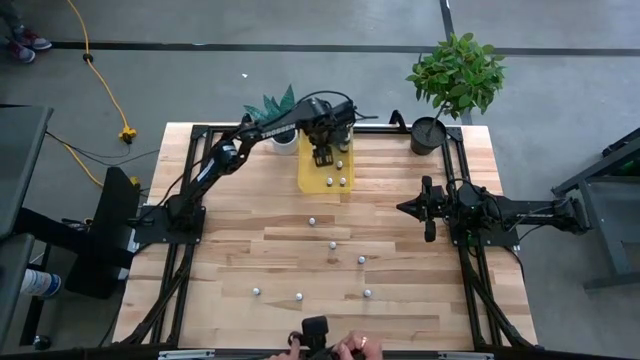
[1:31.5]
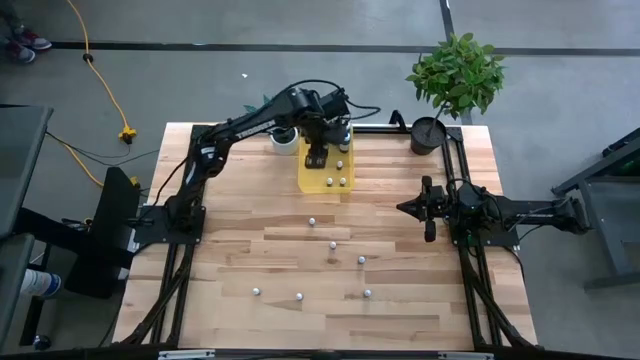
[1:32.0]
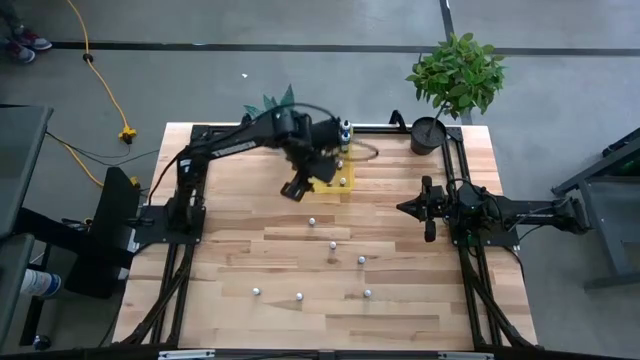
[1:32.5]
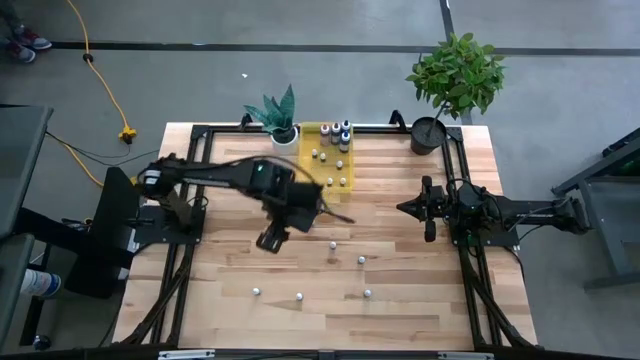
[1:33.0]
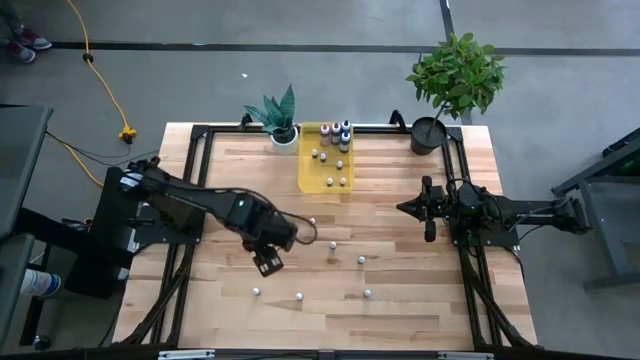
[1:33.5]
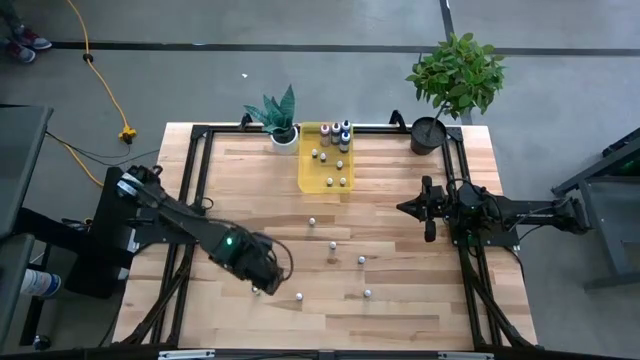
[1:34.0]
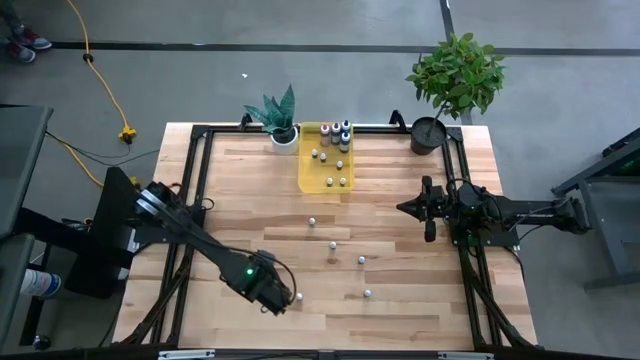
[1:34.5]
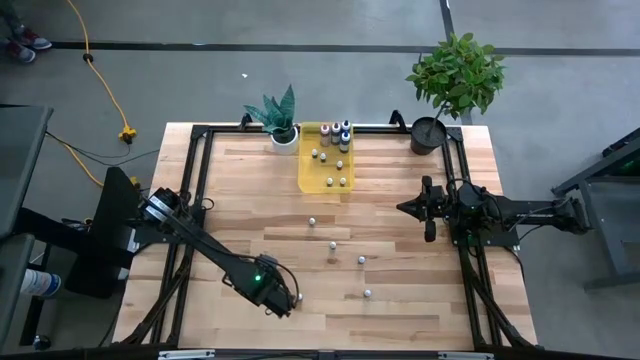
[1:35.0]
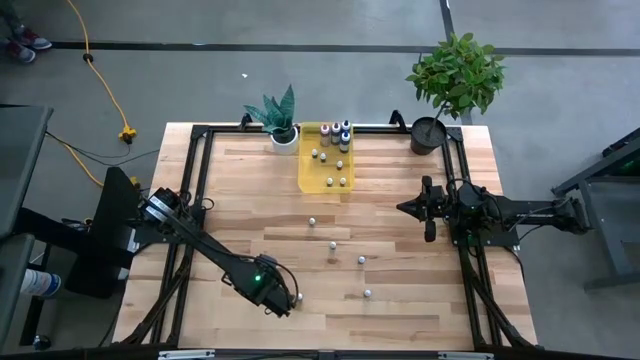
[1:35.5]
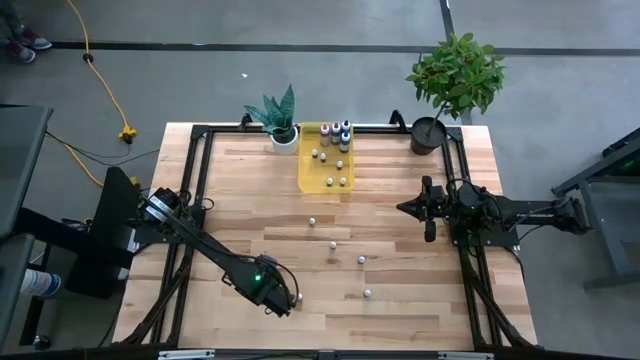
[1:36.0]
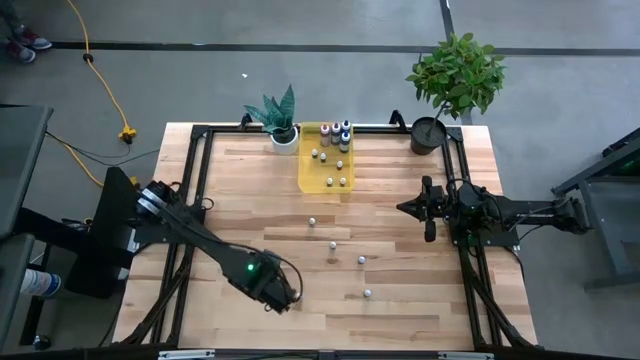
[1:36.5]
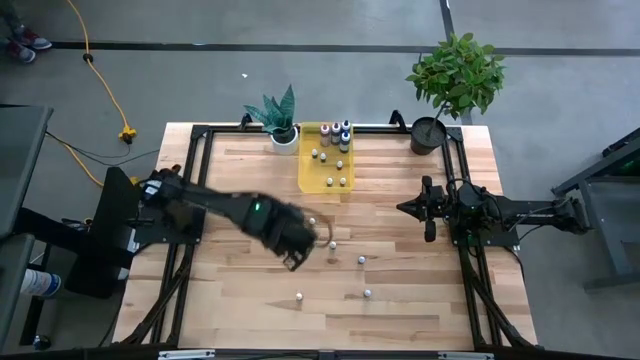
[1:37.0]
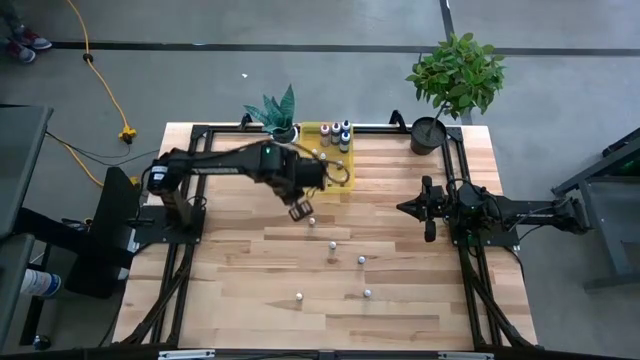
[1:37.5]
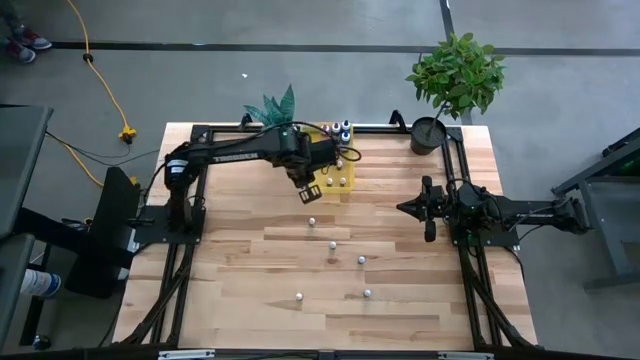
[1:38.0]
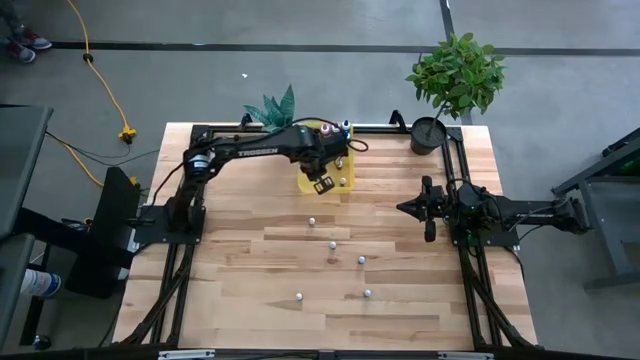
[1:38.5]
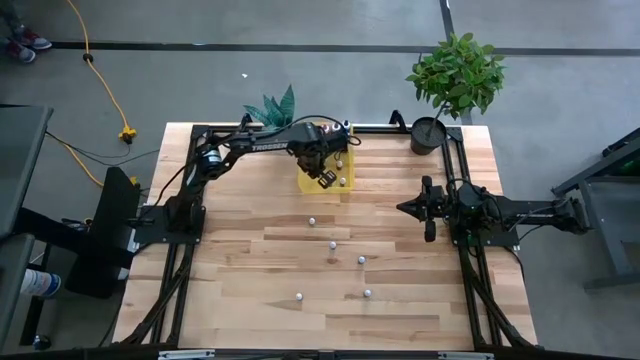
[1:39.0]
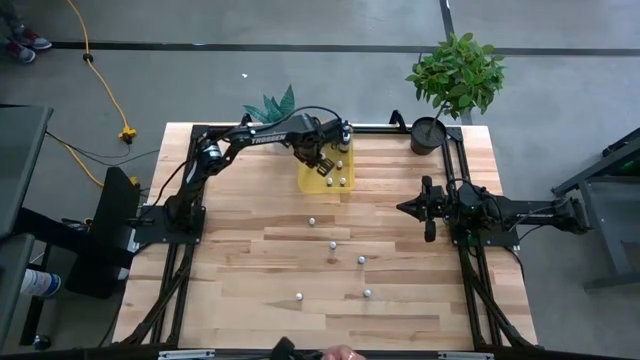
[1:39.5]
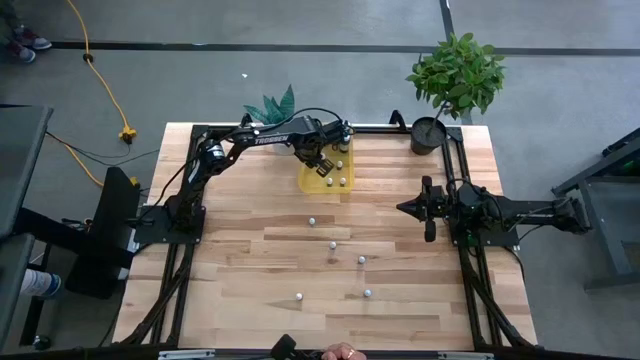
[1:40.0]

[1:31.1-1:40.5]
Task: Pick & Place food coloring
Put the small purple food coloring bottle into the yellow bin

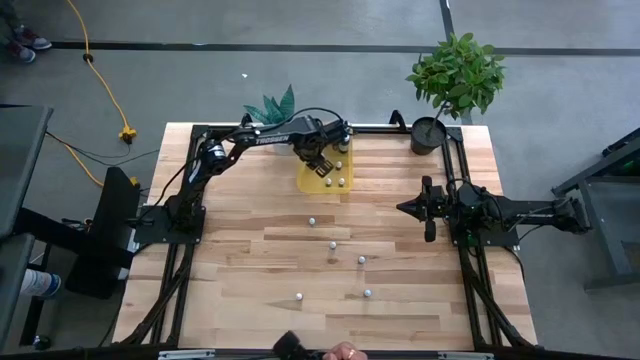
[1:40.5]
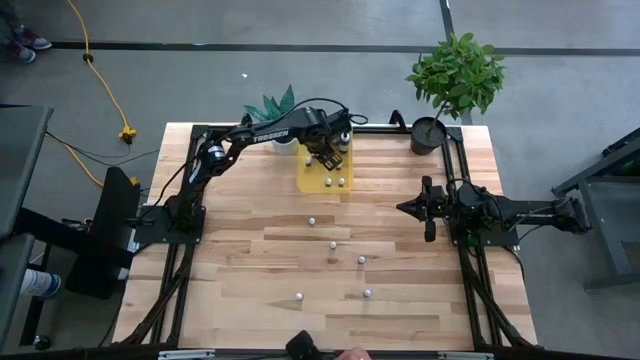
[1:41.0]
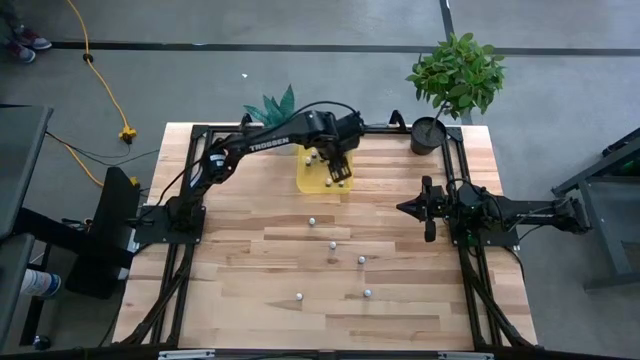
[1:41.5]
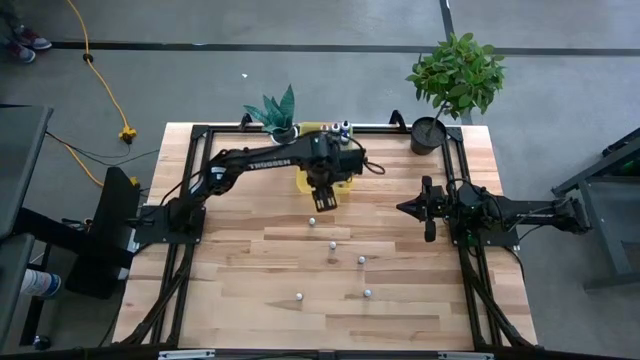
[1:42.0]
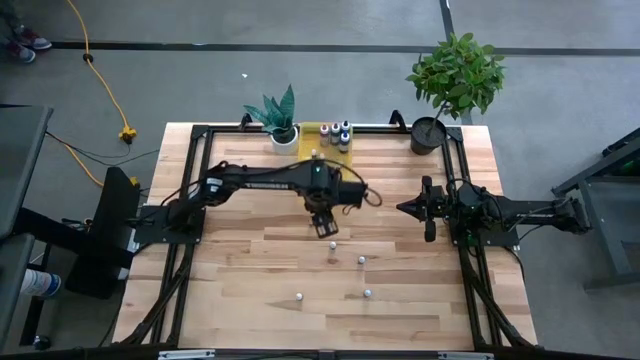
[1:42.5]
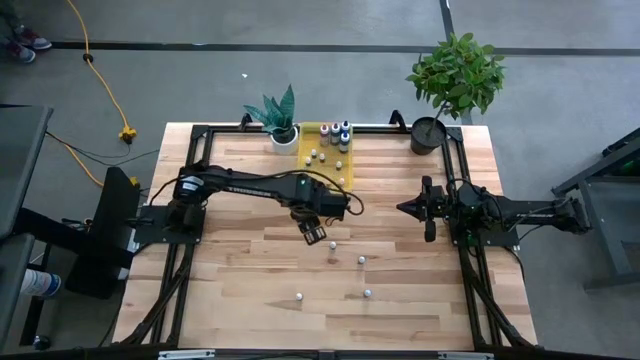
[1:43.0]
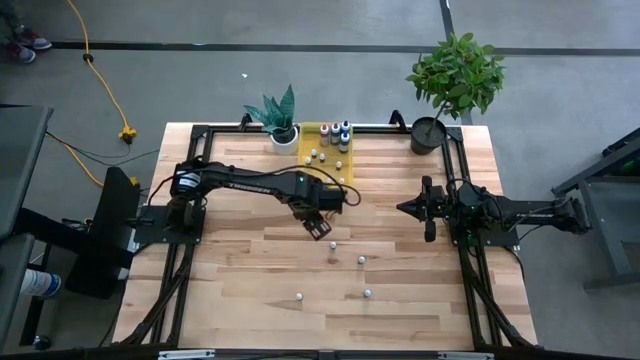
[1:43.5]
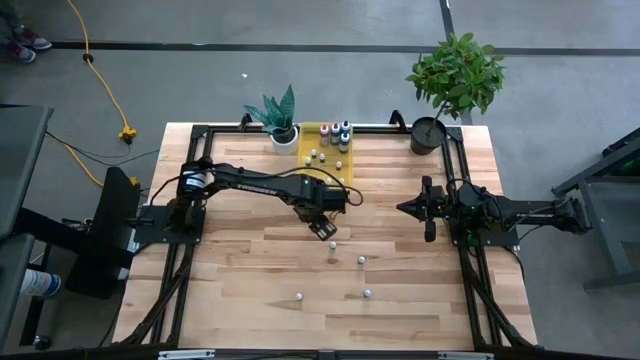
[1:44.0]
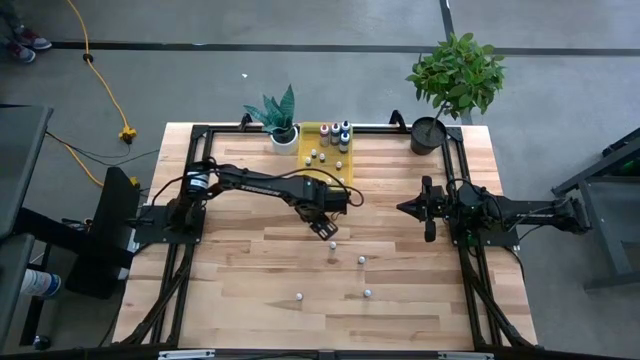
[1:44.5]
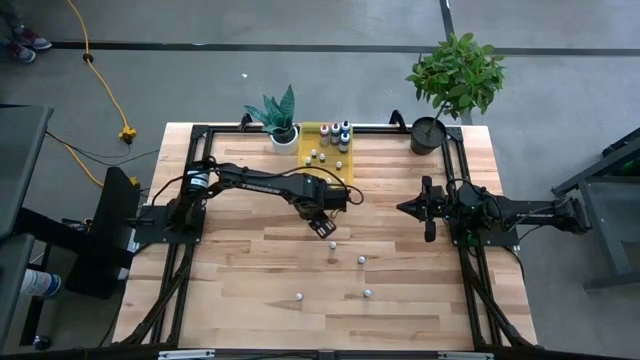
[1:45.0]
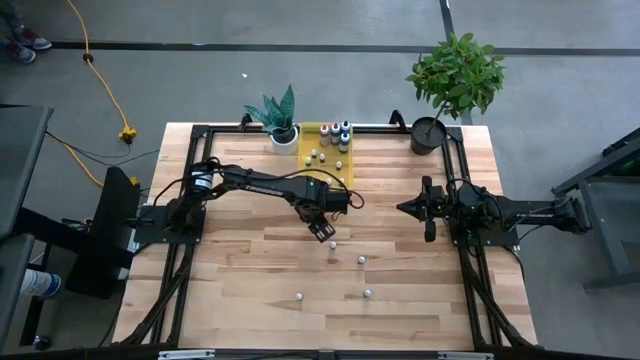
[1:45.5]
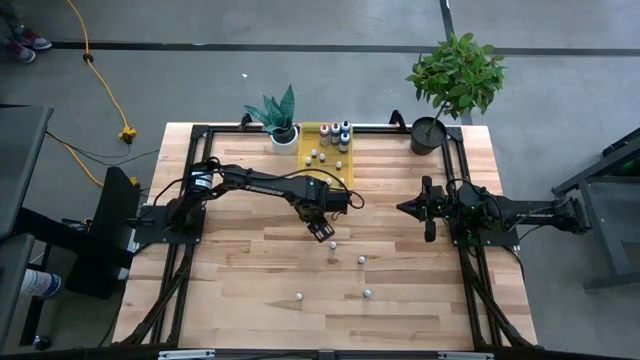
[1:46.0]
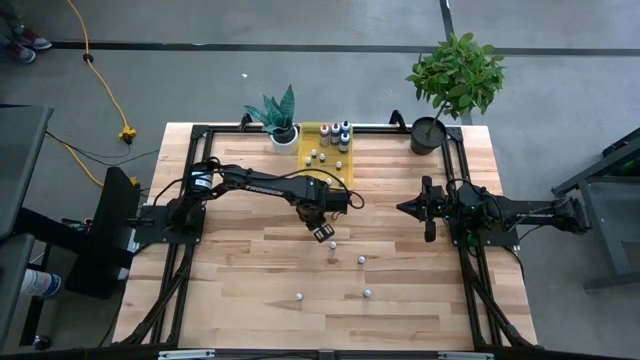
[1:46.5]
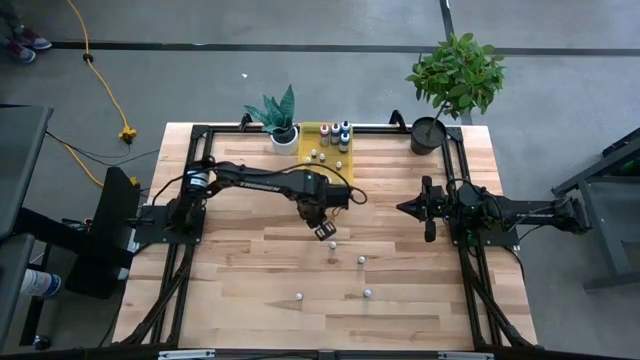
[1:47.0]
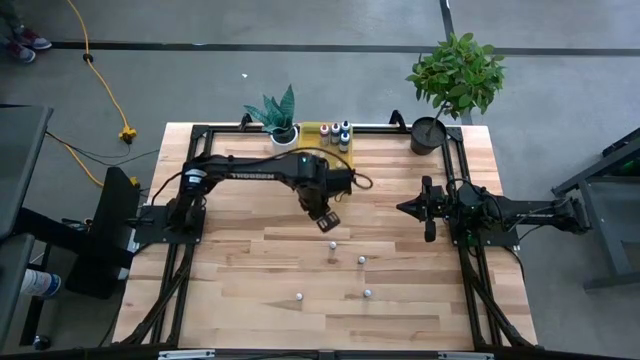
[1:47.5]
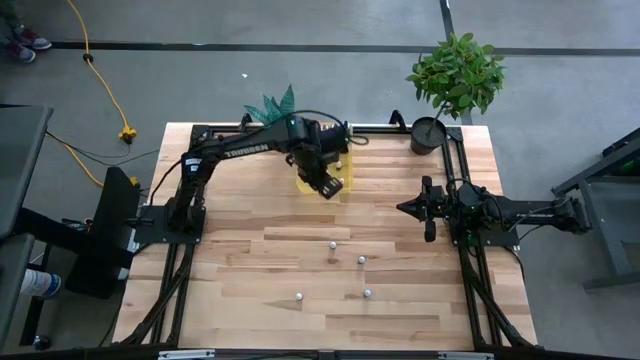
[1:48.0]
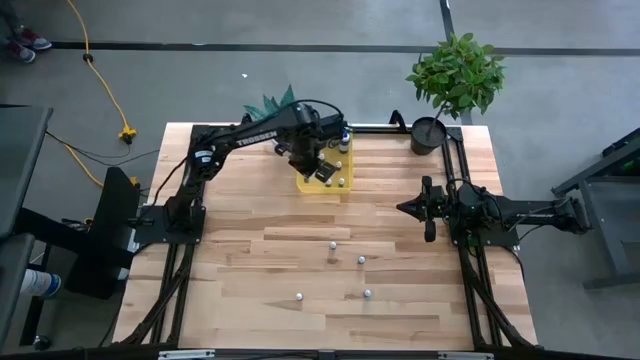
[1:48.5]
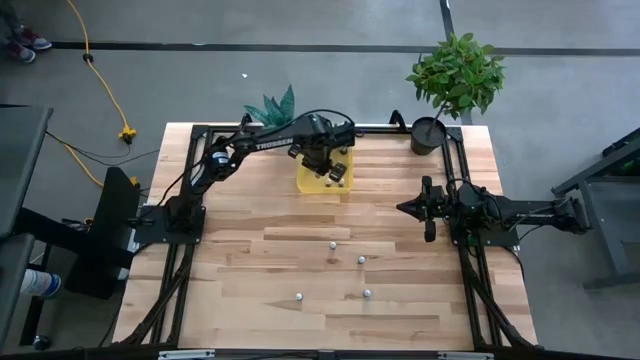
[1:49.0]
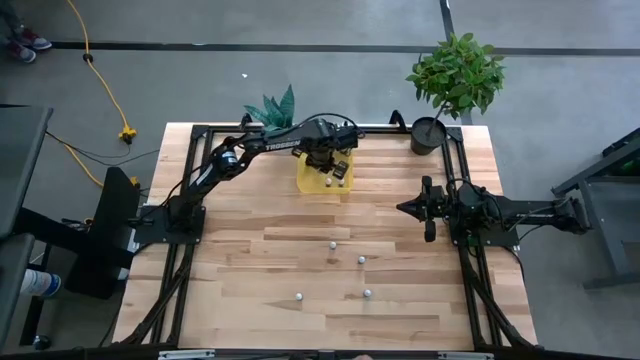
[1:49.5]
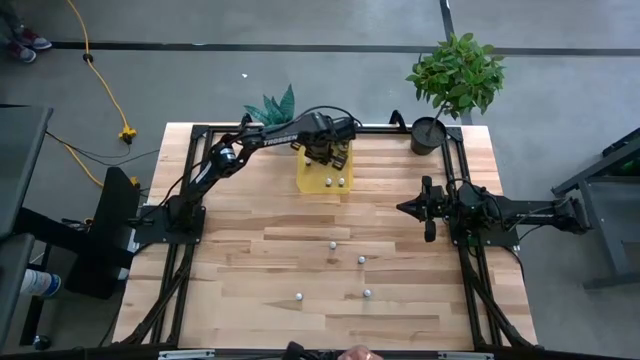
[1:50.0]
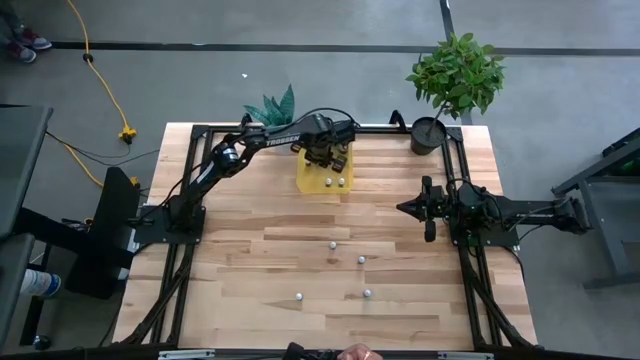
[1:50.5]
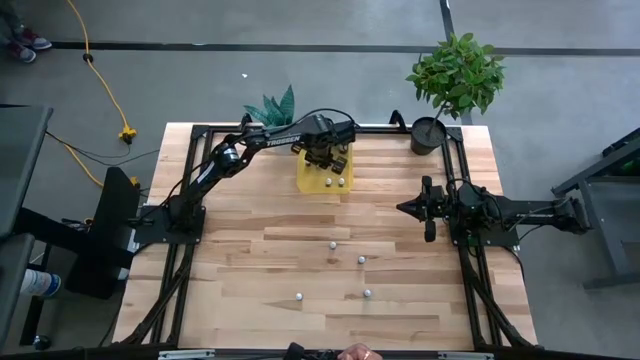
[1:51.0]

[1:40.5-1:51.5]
Put the small light green food coloring bottle into the yellow bin

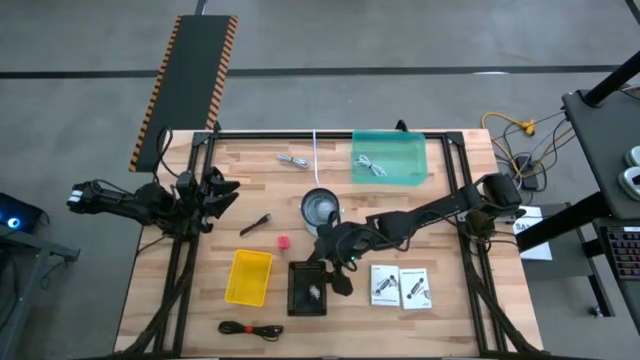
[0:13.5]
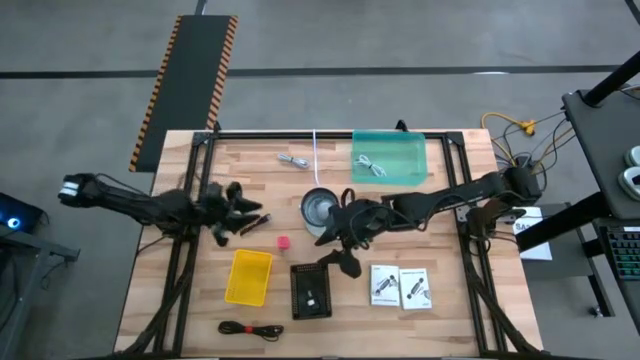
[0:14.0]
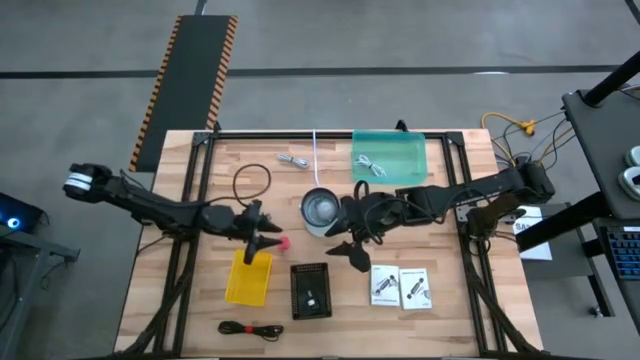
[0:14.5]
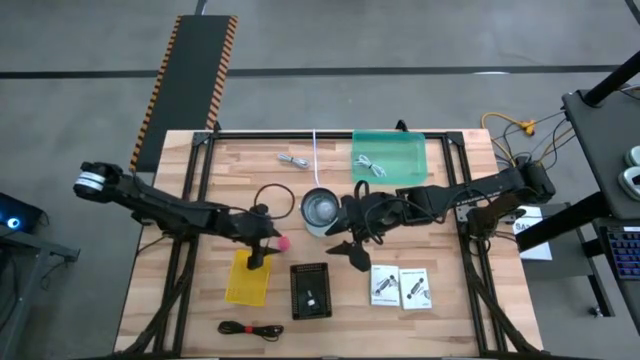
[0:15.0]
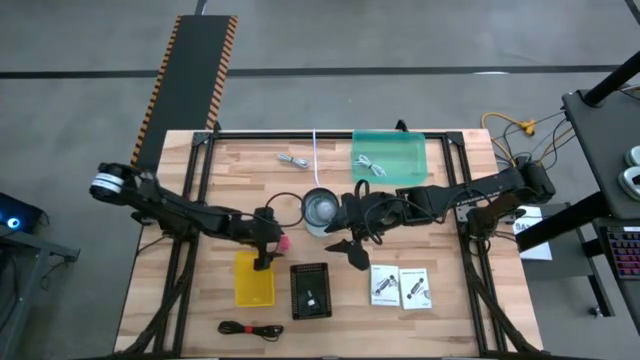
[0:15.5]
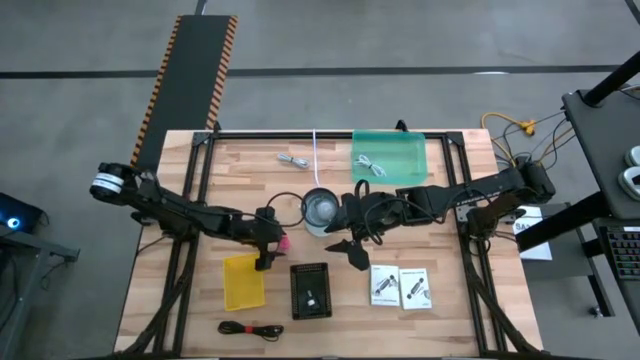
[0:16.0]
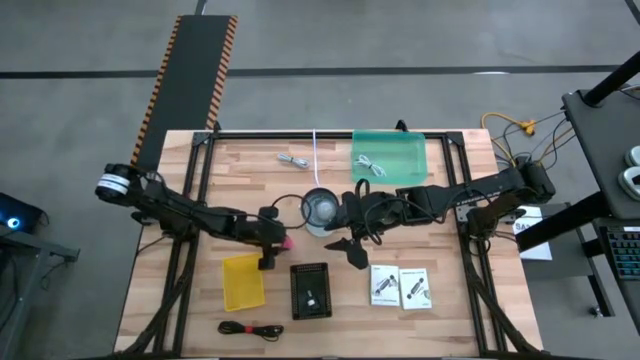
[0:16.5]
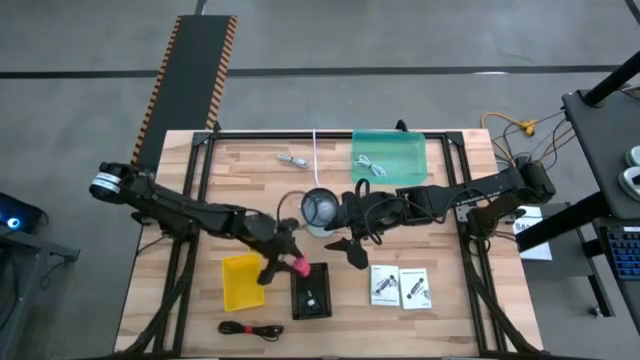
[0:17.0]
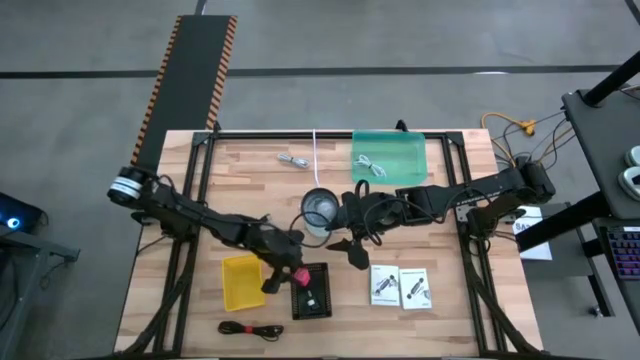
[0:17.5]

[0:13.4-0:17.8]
Task: Pick and place items into bin
Put the pink adapter into the black bin
